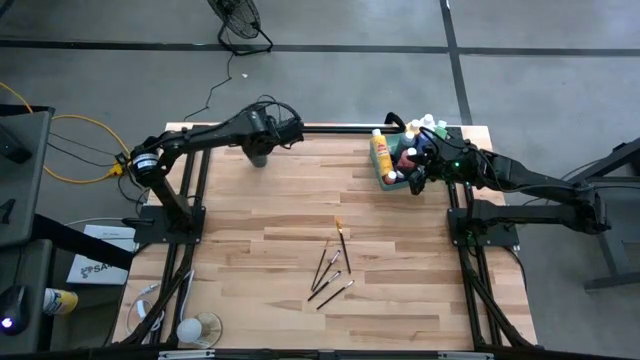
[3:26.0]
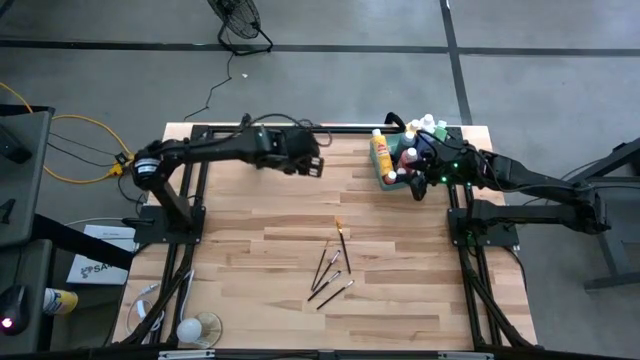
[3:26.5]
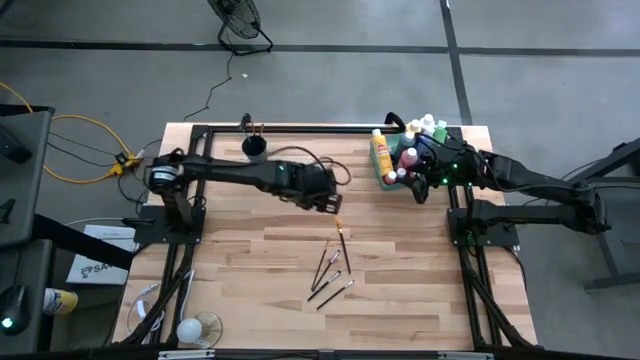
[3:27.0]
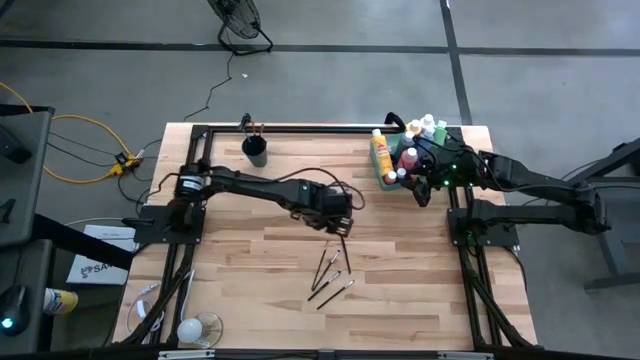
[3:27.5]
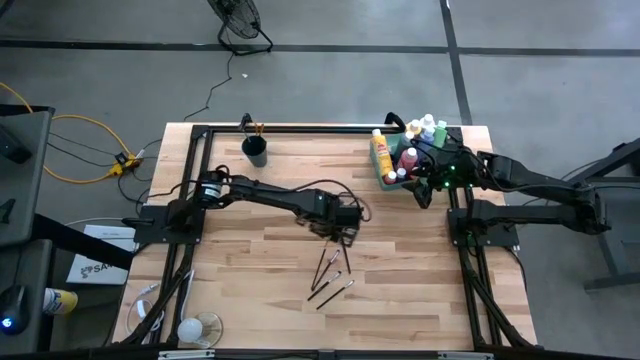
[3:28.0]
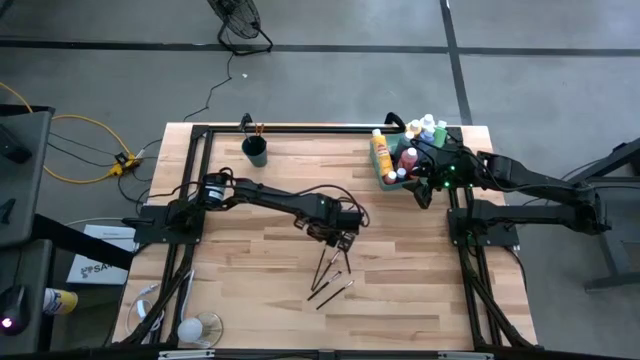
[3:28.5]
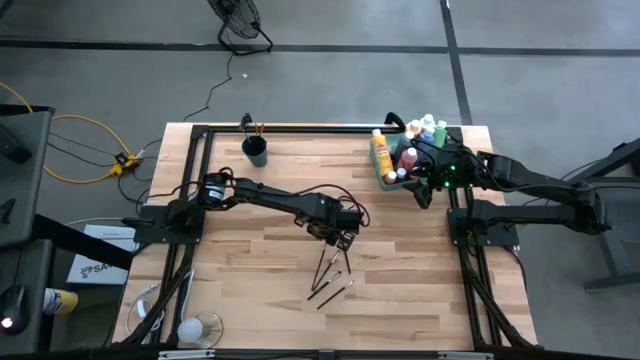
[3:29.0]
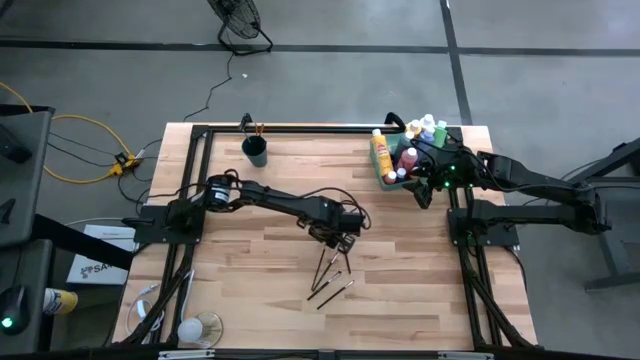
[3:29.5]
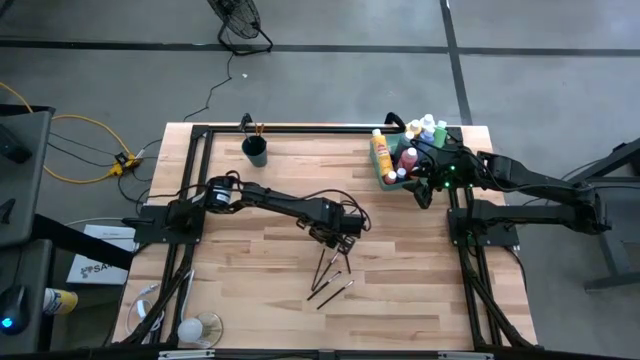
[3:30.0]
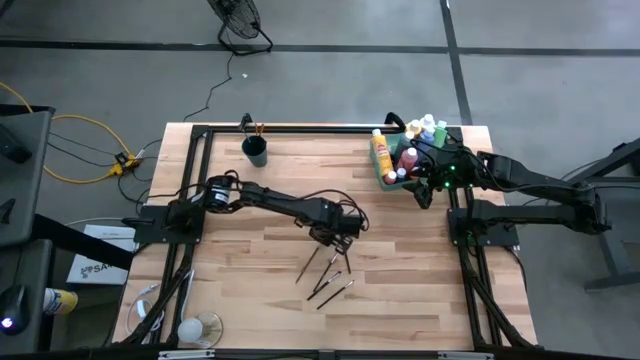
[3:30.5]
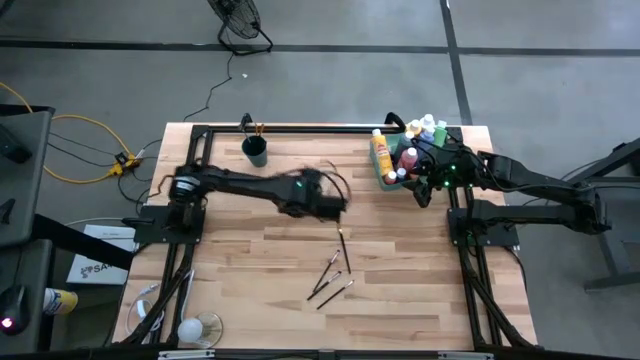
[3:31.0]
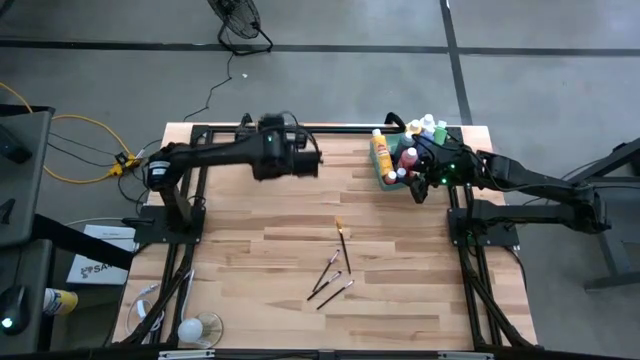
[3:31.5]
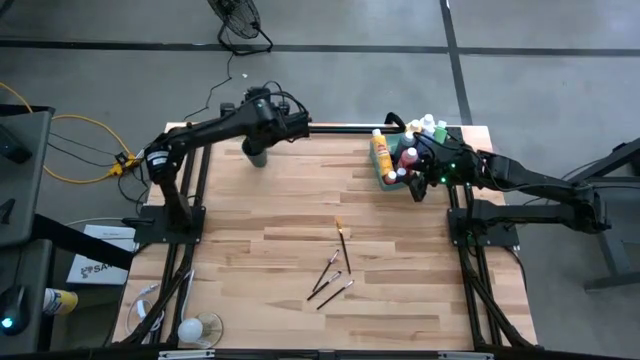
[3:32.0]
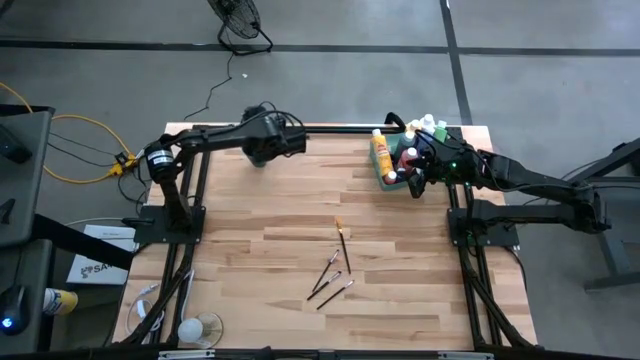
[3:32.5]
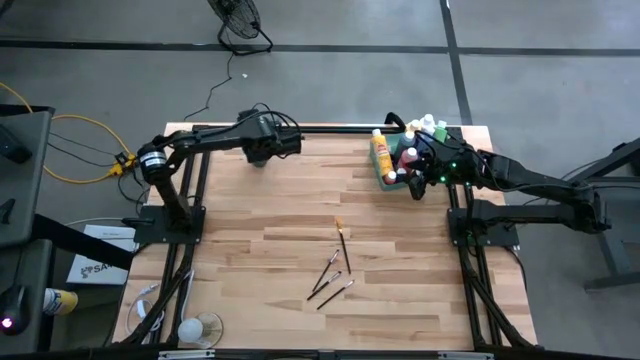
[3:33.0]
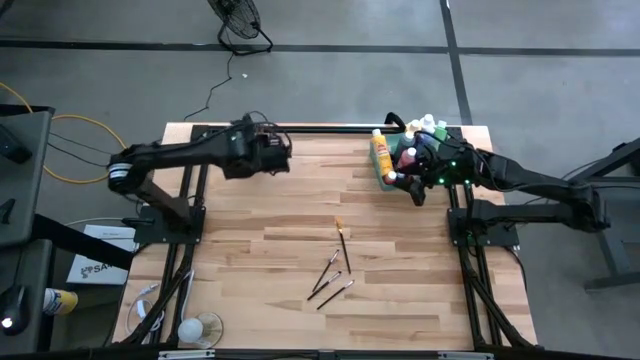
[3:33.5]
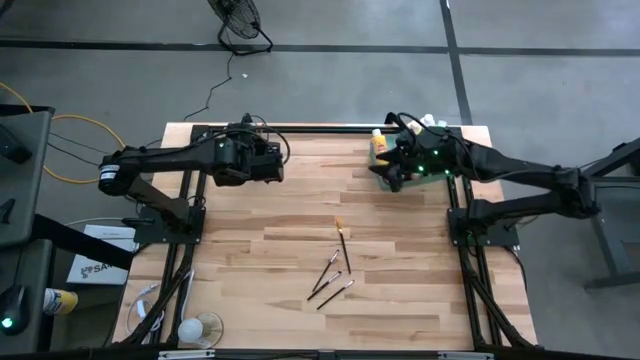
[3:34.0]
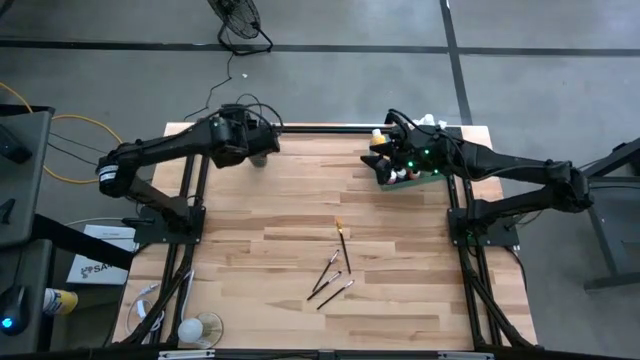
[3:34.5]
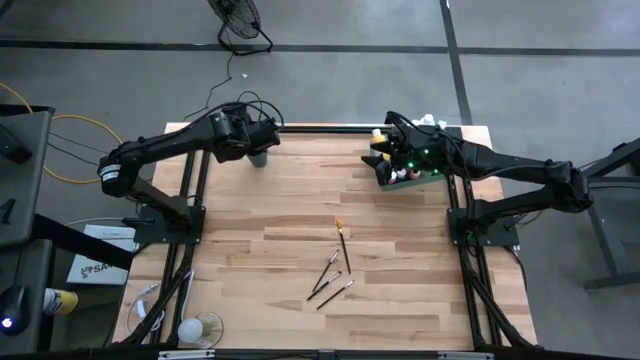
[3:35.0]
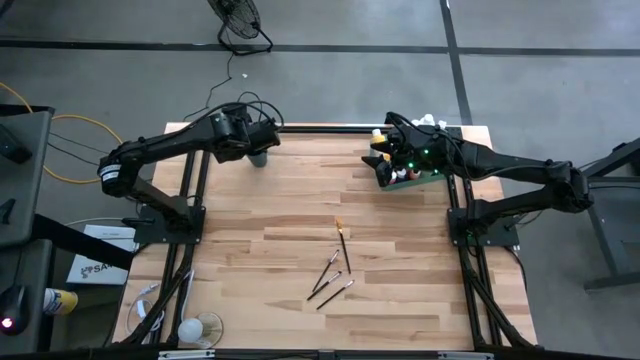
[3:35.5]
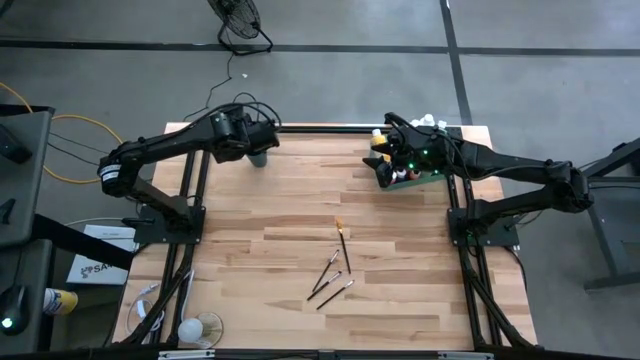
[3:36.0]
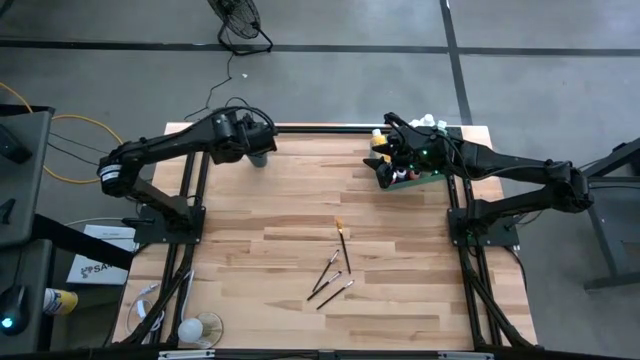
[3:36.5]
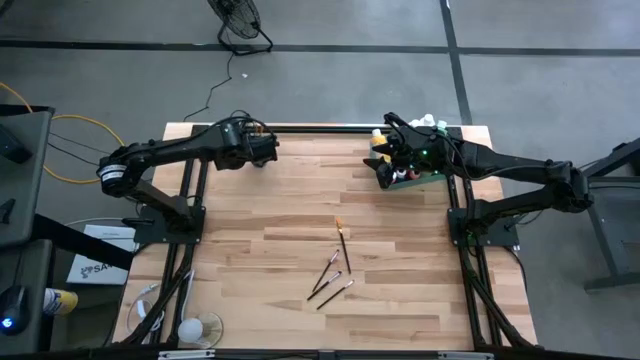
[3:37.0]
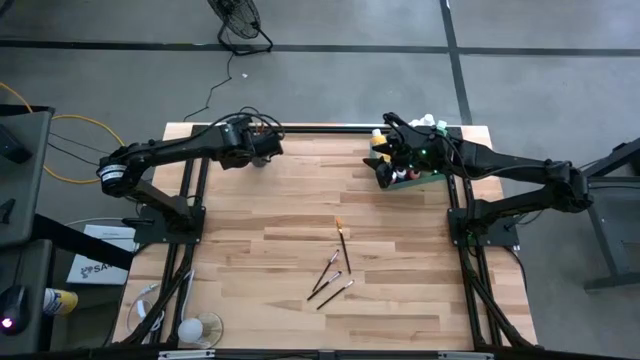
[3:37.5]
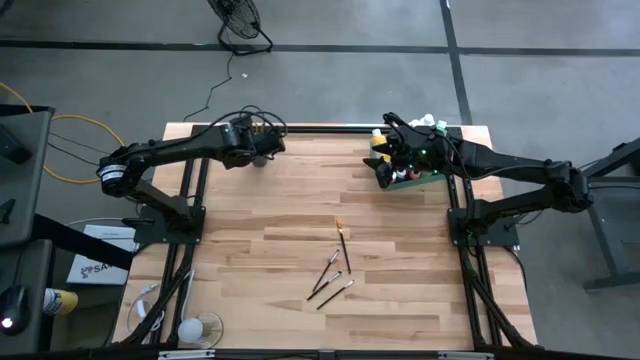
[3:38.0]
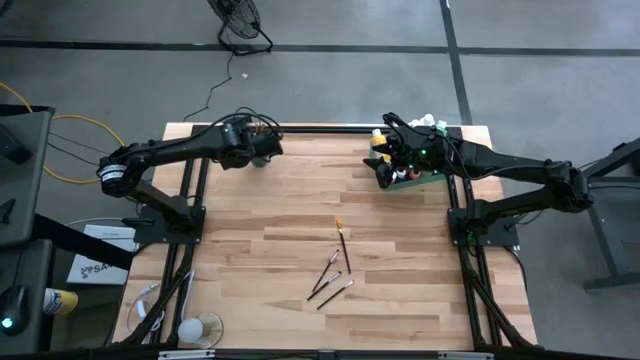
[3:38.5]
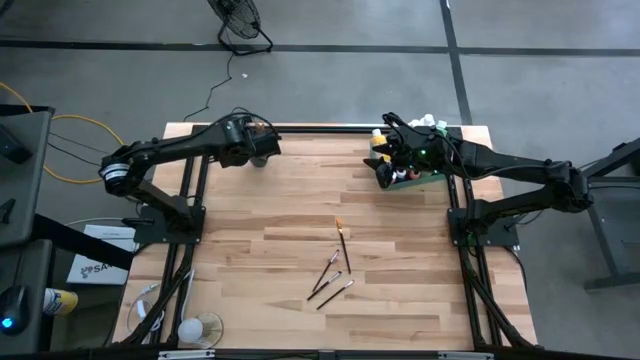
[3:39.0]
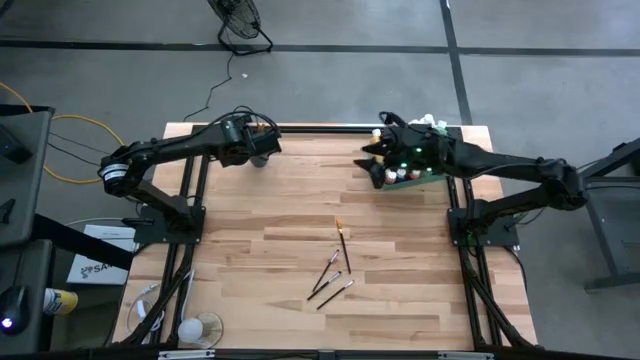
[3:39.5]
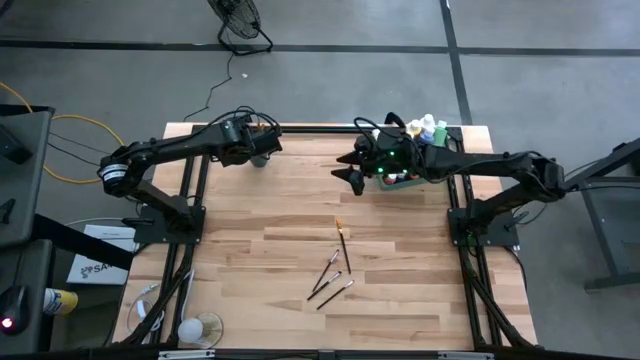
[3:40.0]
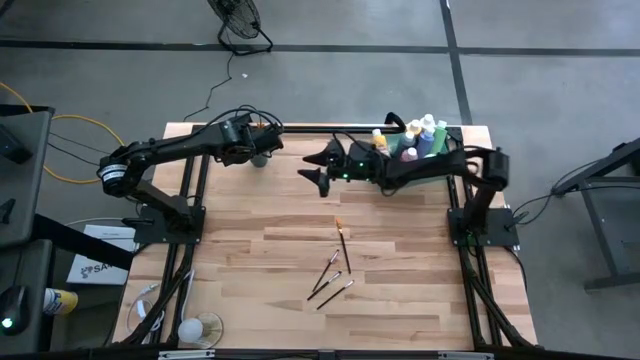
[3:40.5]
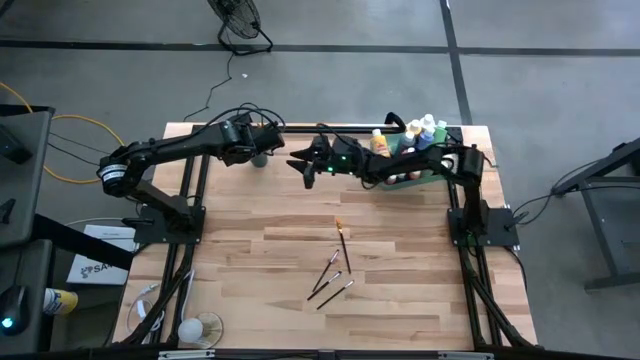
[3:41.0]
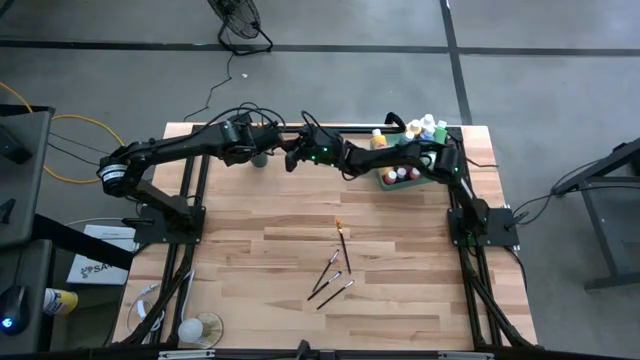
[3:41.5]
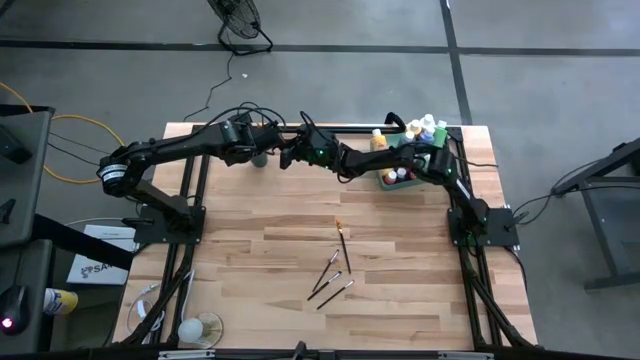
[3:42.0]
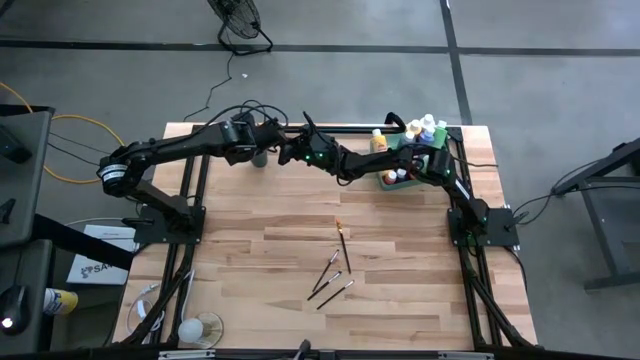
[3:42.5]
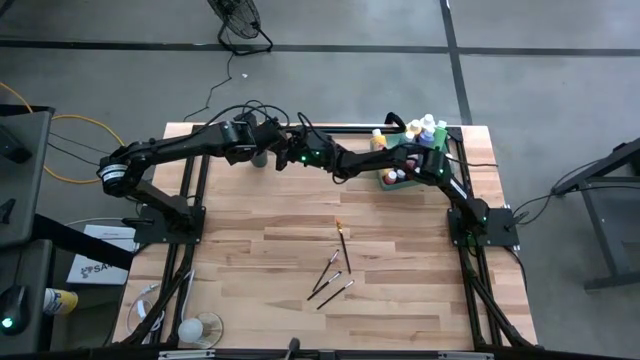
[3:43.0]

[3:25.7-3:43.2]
Task: Pick & Place Paint Supplies
Put the gold paintbrush into the blue cup

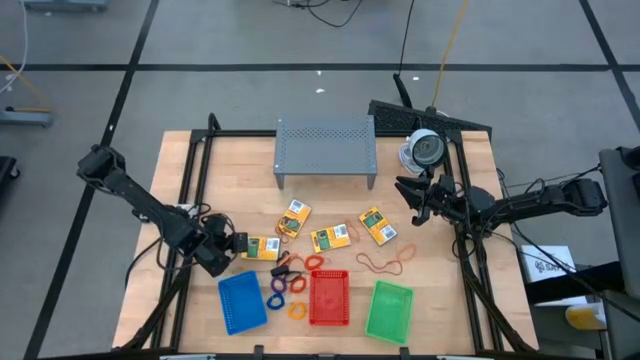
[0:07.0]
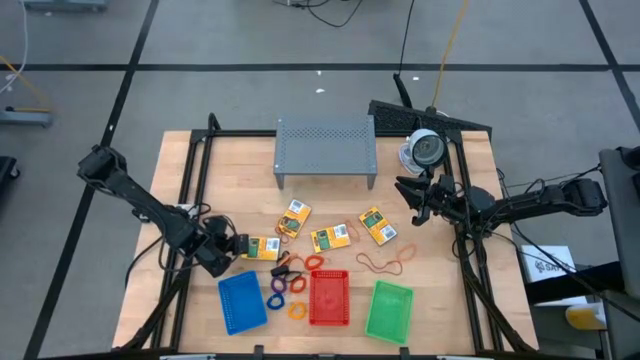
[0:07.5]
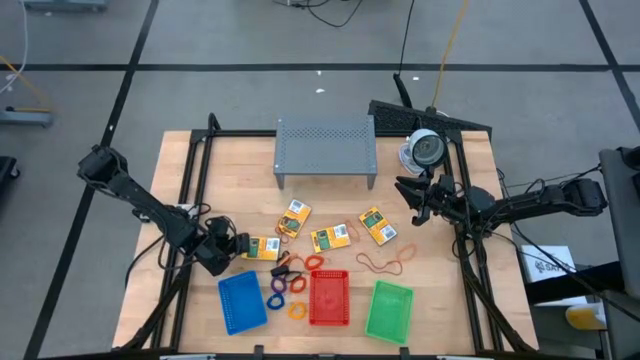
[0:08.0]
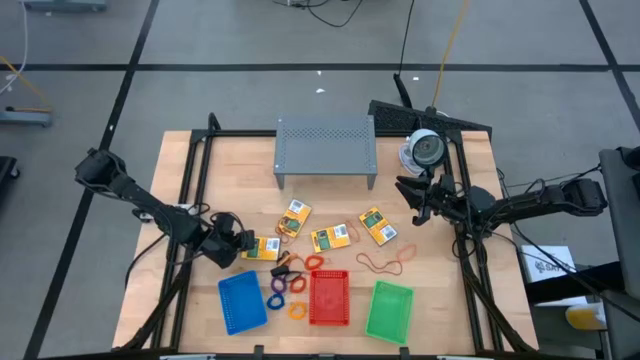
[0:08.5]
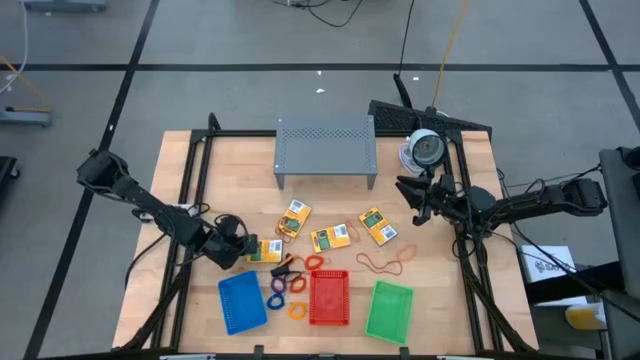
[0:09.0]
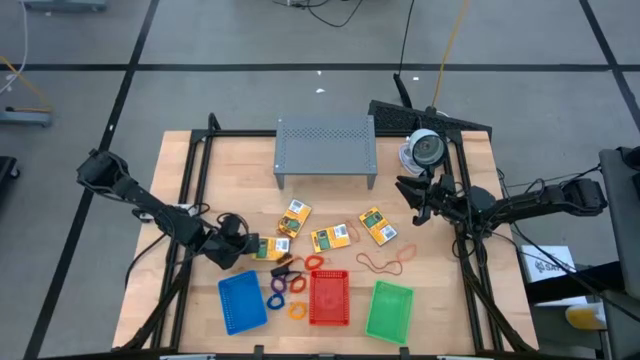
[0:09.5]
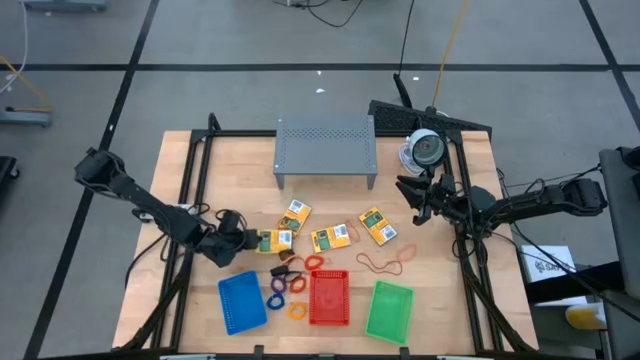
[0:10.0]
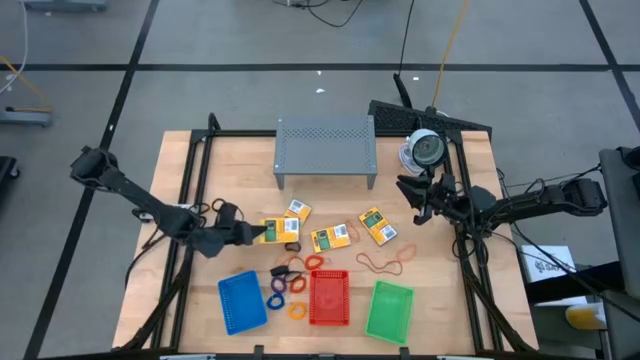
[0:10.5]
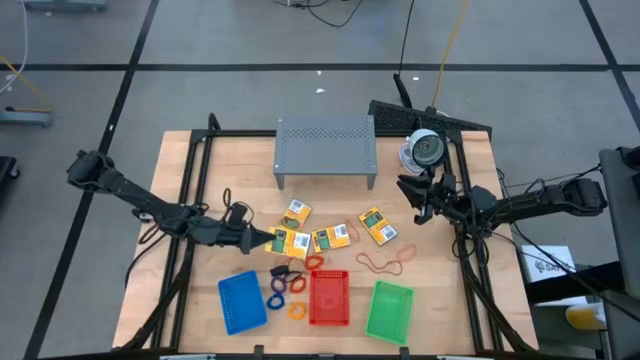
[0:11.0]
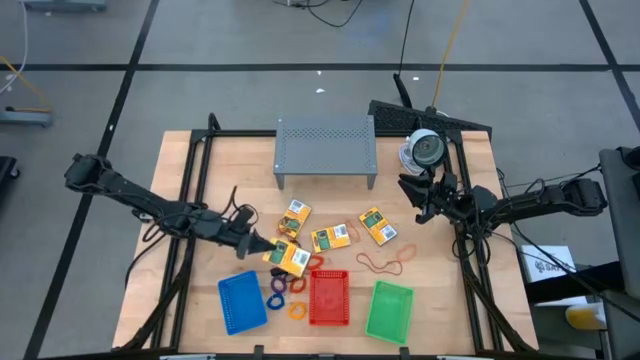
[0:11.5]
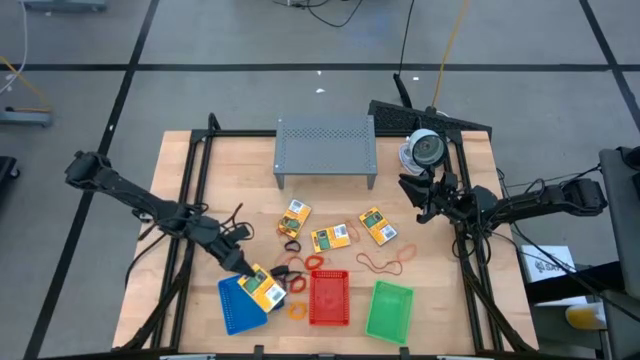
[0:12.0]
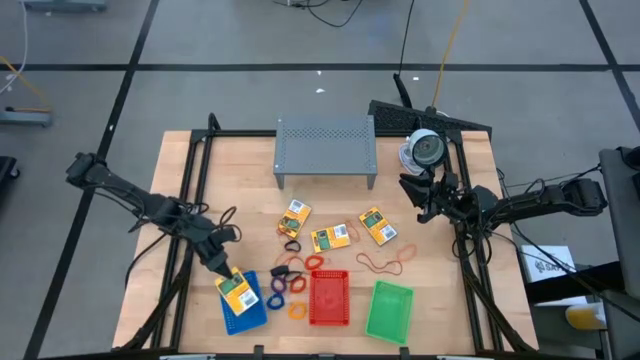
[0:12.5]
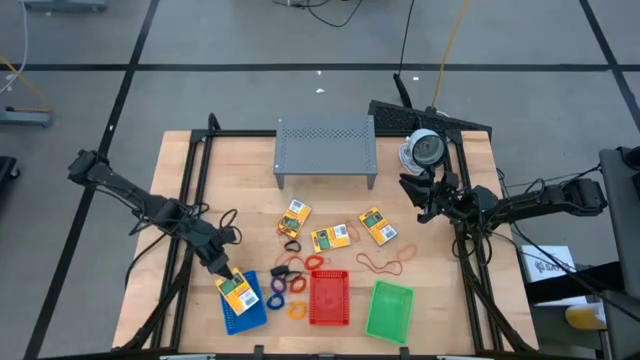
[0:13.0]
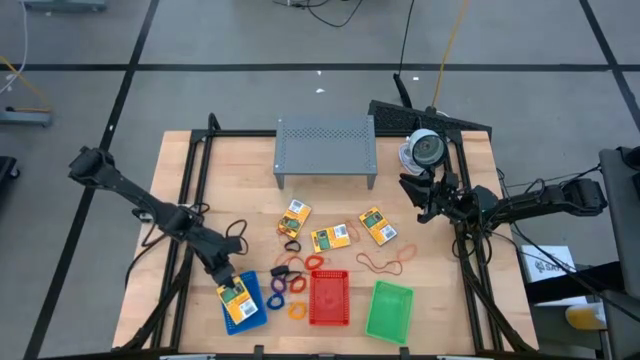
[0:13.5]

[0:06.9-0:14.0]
Task: Pick & Place Office Desk Supplies
Put the crayon box into the blue bin
